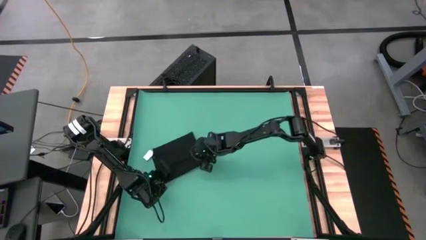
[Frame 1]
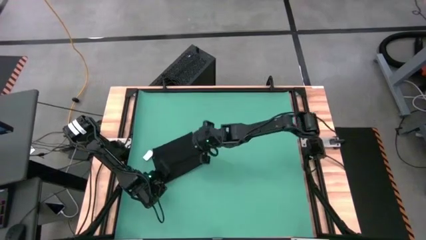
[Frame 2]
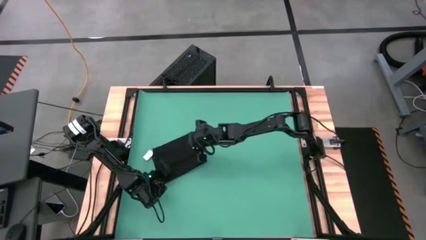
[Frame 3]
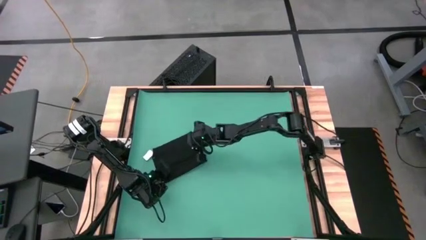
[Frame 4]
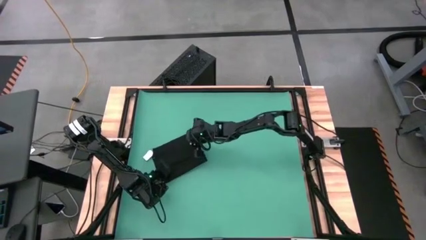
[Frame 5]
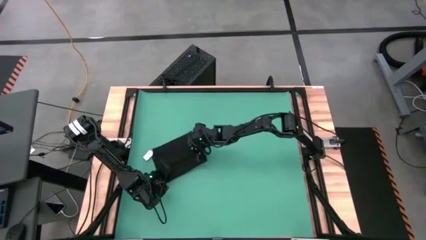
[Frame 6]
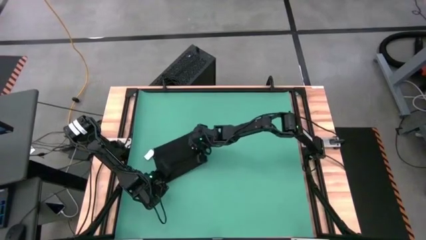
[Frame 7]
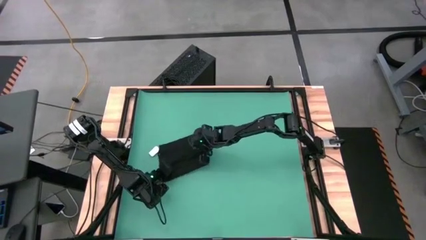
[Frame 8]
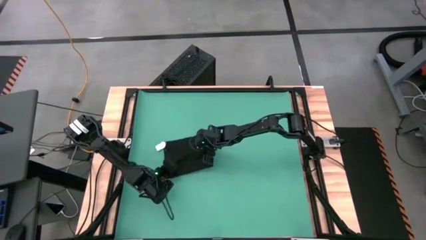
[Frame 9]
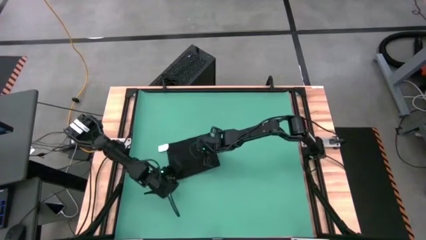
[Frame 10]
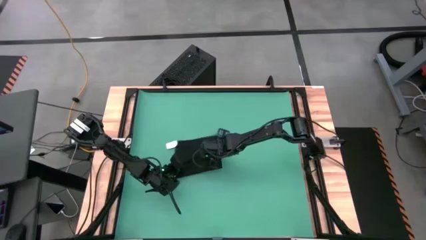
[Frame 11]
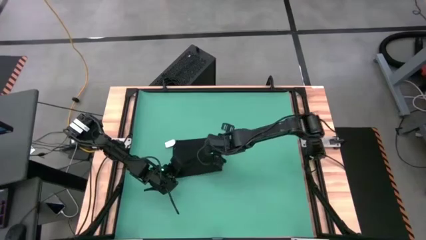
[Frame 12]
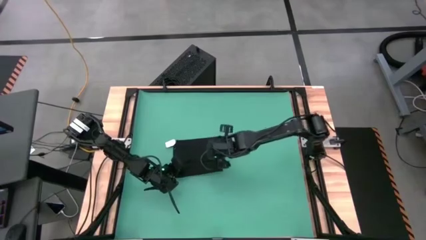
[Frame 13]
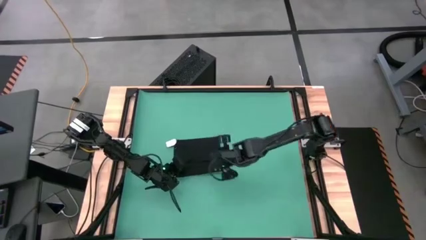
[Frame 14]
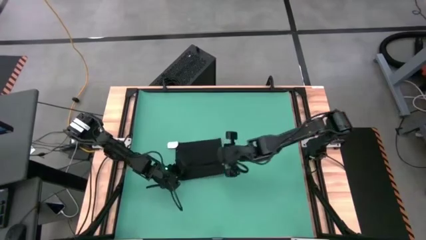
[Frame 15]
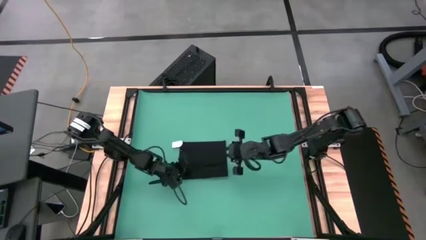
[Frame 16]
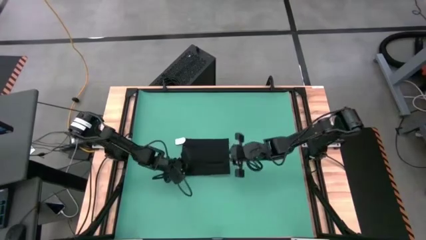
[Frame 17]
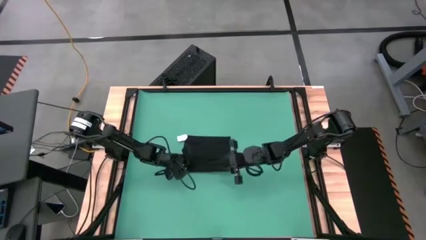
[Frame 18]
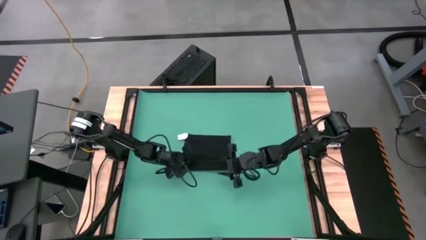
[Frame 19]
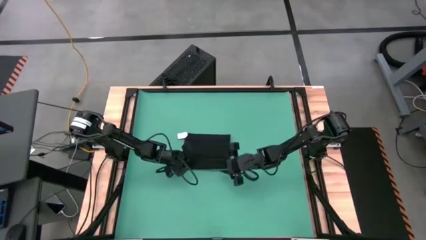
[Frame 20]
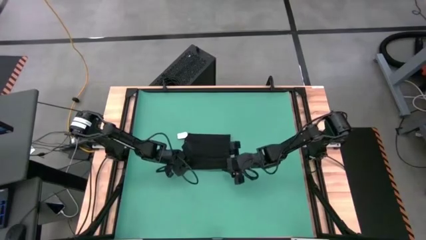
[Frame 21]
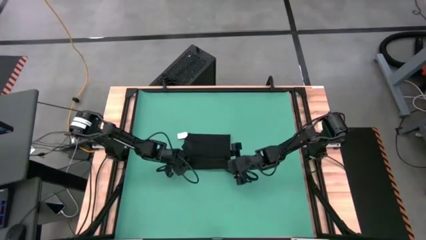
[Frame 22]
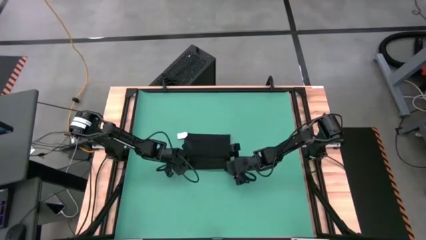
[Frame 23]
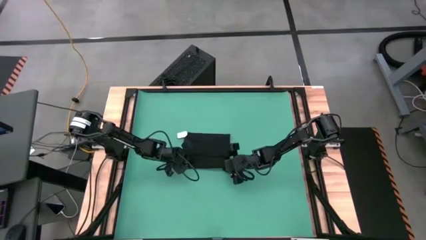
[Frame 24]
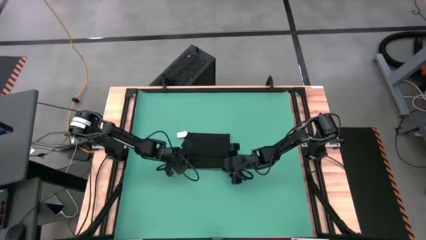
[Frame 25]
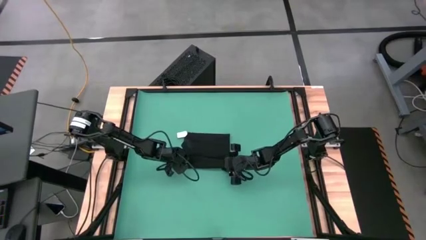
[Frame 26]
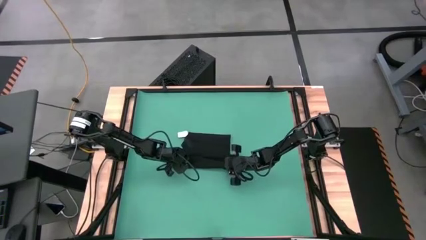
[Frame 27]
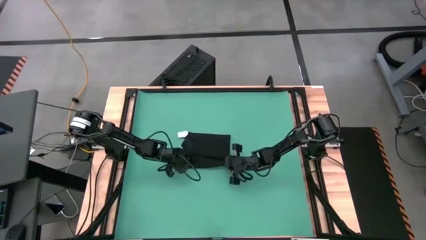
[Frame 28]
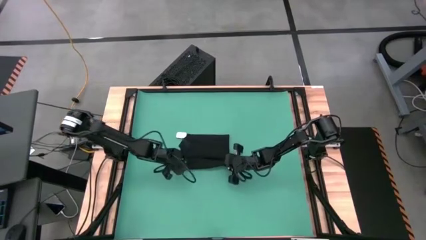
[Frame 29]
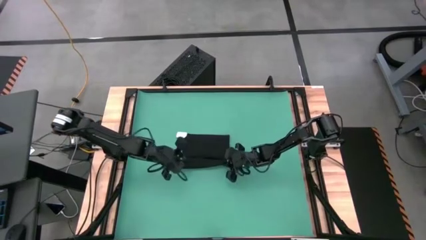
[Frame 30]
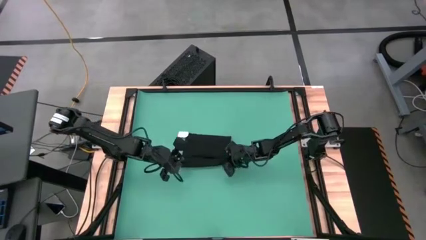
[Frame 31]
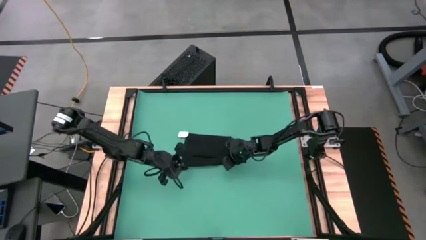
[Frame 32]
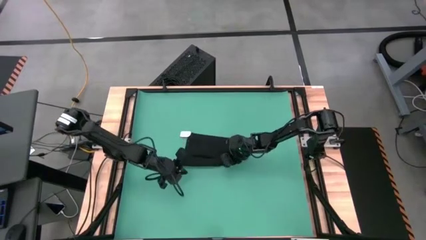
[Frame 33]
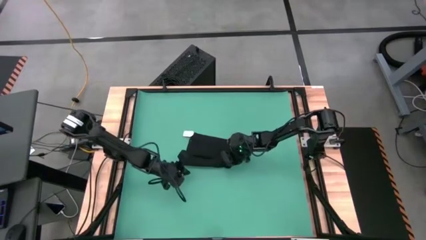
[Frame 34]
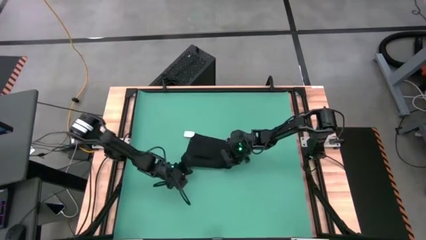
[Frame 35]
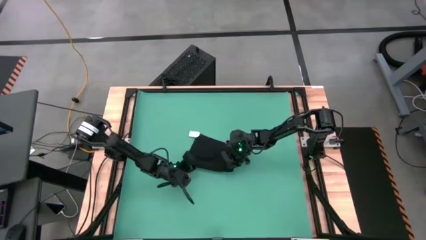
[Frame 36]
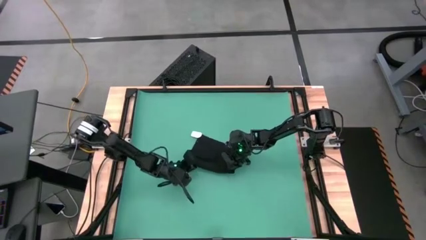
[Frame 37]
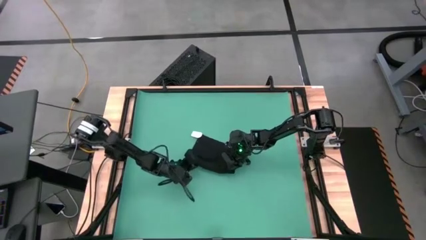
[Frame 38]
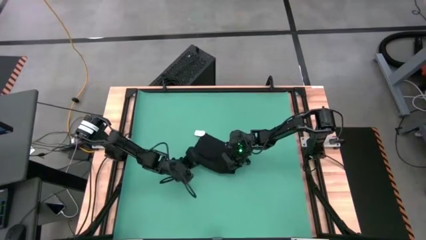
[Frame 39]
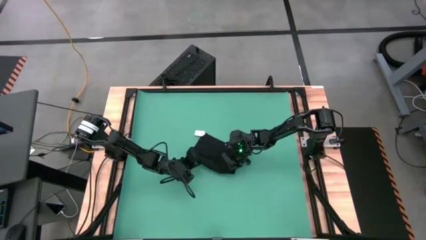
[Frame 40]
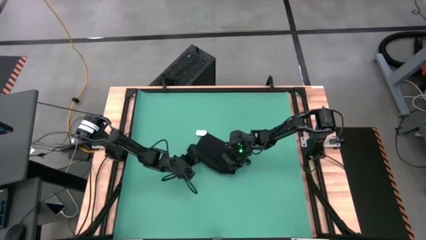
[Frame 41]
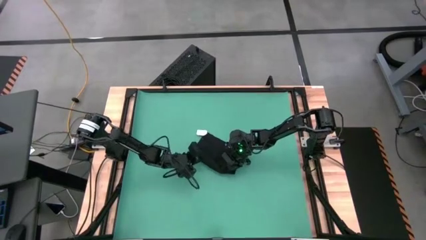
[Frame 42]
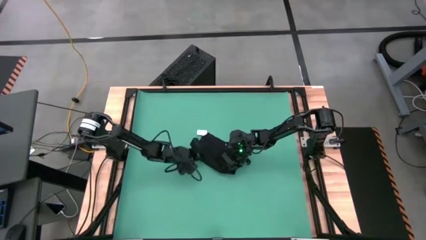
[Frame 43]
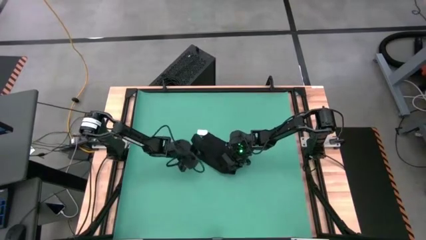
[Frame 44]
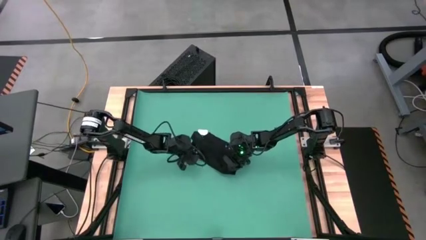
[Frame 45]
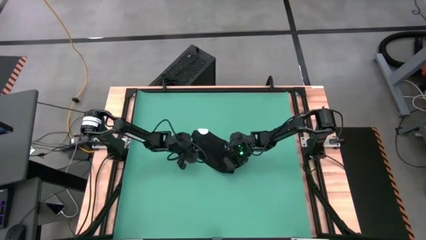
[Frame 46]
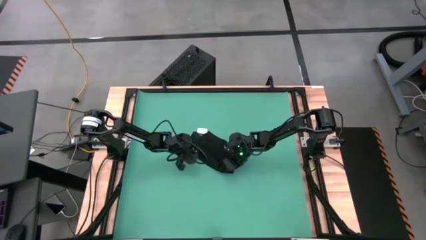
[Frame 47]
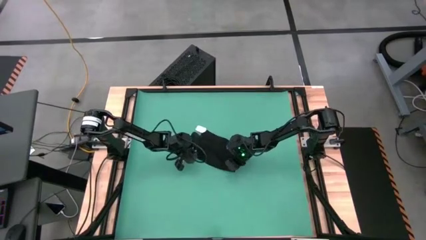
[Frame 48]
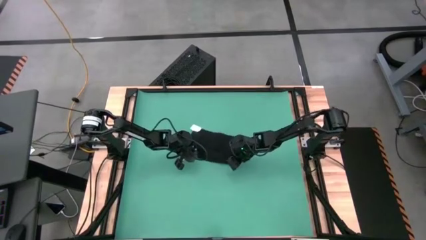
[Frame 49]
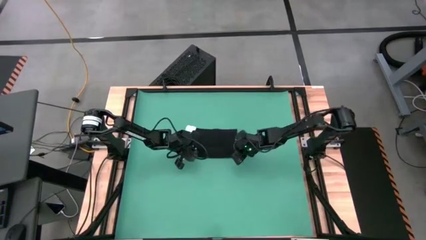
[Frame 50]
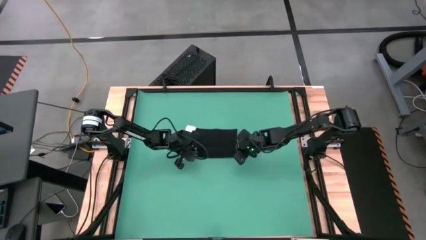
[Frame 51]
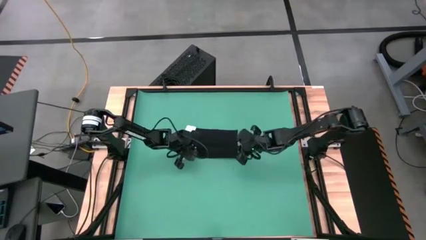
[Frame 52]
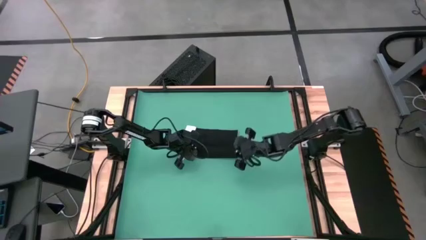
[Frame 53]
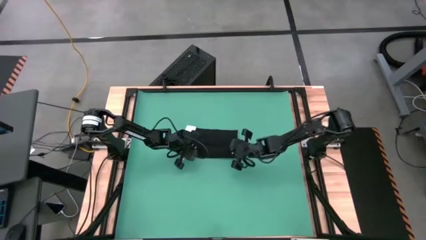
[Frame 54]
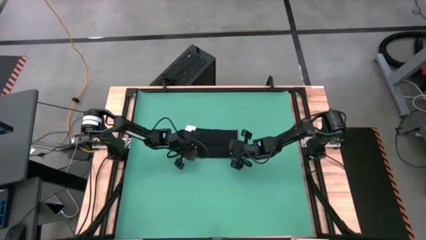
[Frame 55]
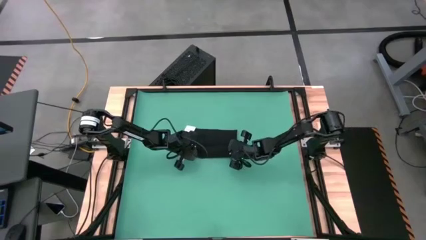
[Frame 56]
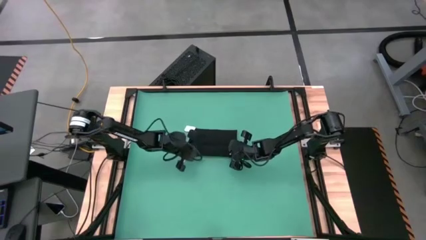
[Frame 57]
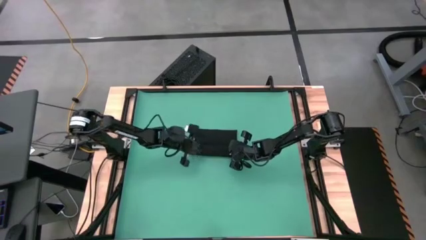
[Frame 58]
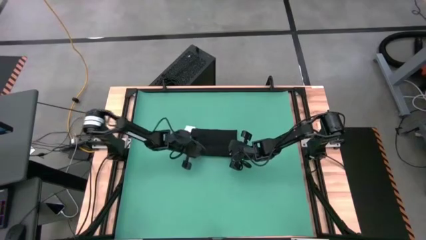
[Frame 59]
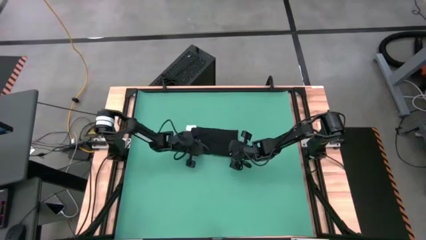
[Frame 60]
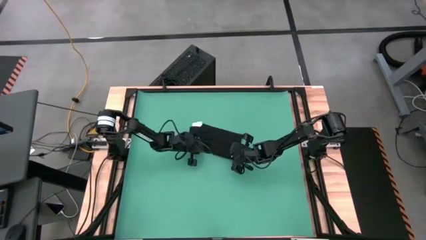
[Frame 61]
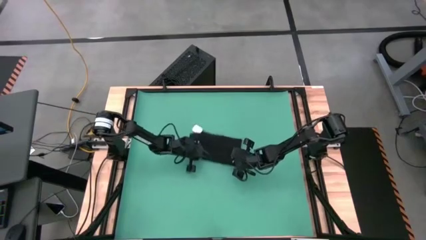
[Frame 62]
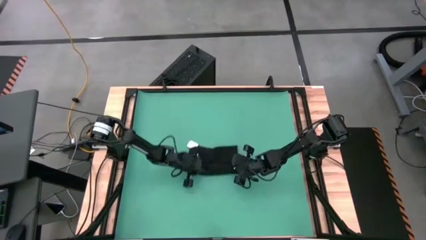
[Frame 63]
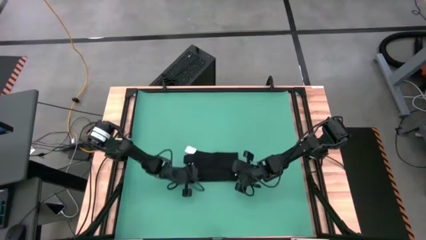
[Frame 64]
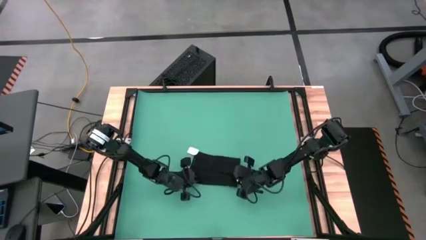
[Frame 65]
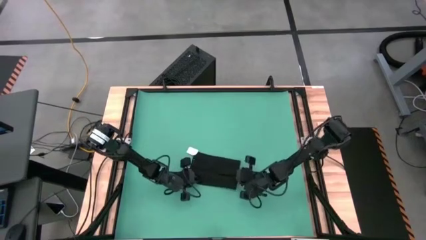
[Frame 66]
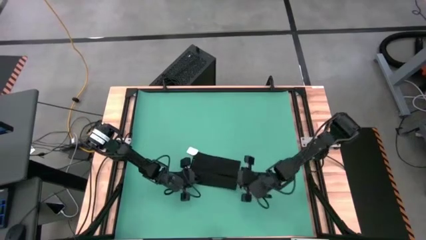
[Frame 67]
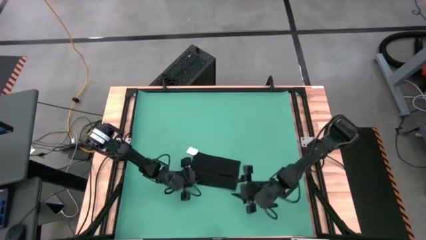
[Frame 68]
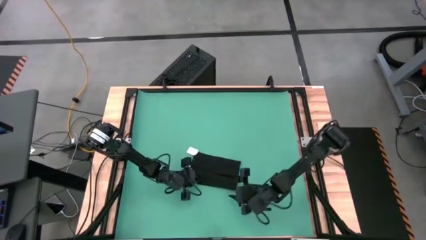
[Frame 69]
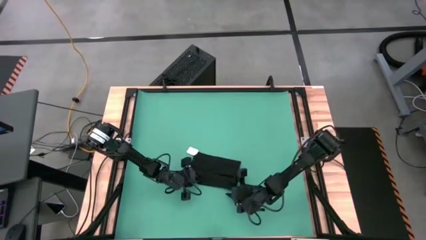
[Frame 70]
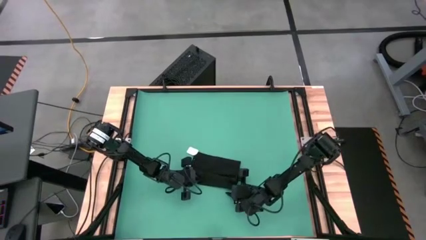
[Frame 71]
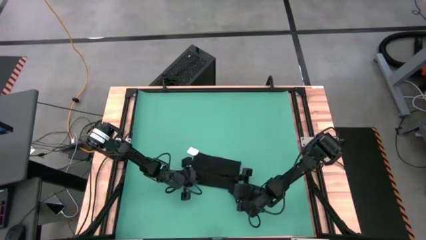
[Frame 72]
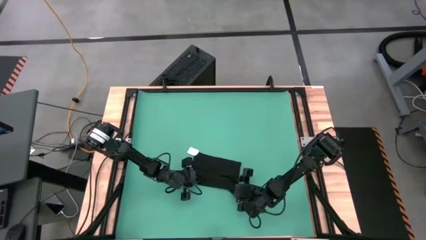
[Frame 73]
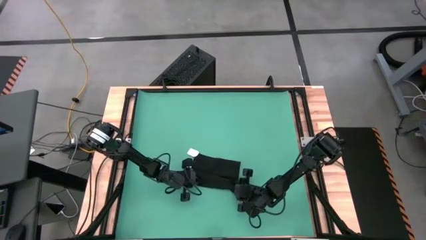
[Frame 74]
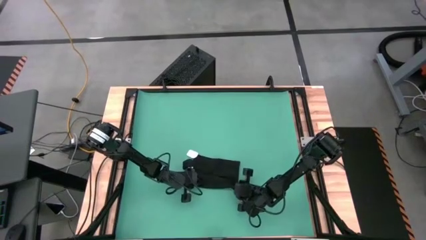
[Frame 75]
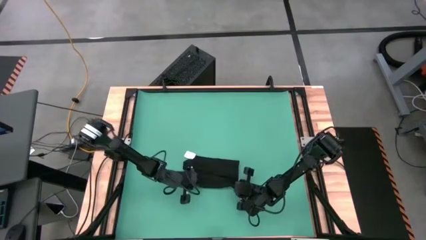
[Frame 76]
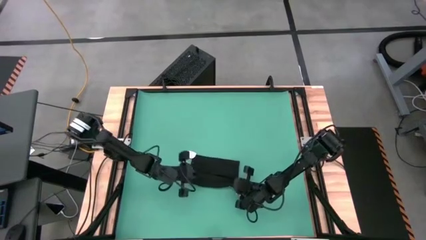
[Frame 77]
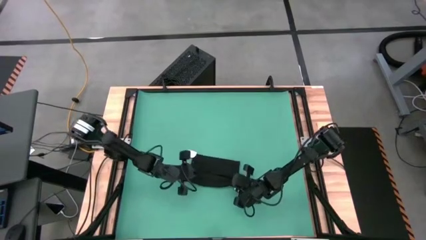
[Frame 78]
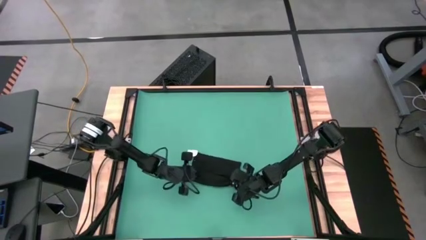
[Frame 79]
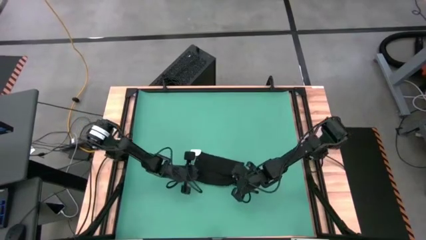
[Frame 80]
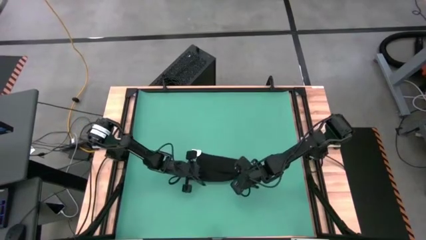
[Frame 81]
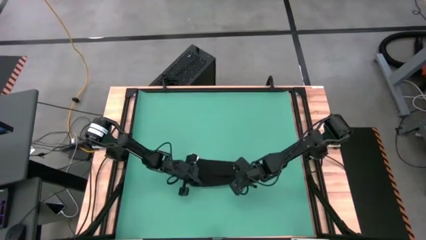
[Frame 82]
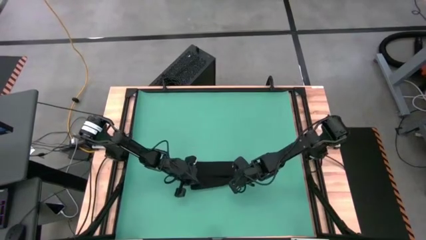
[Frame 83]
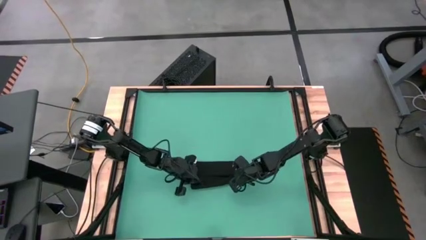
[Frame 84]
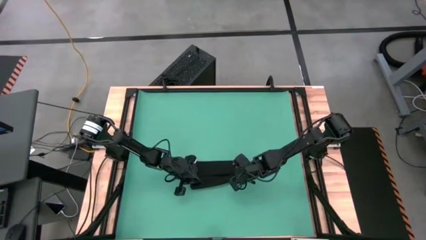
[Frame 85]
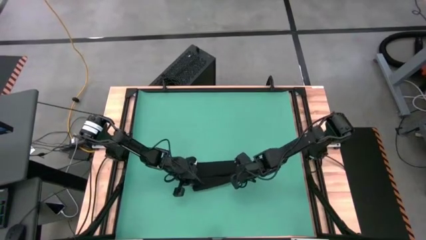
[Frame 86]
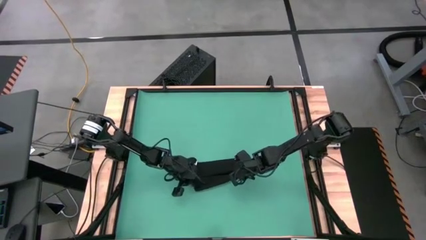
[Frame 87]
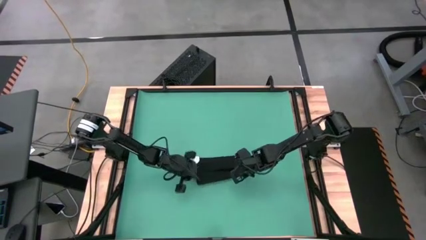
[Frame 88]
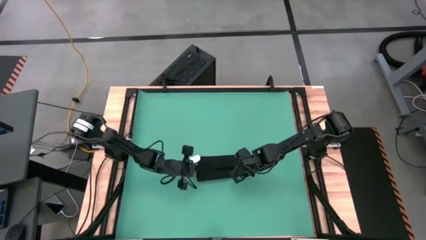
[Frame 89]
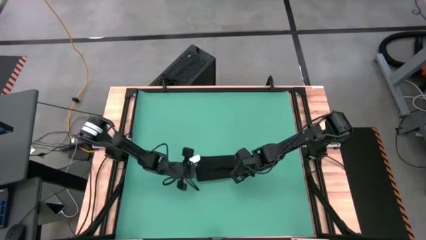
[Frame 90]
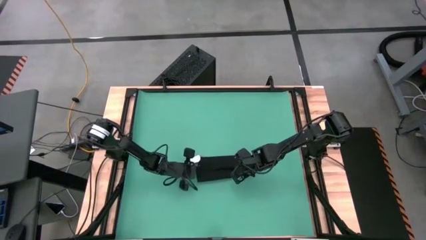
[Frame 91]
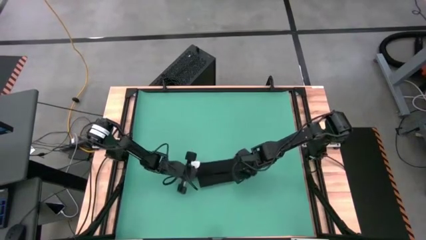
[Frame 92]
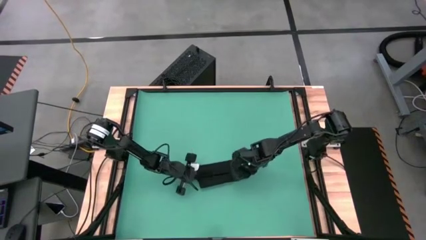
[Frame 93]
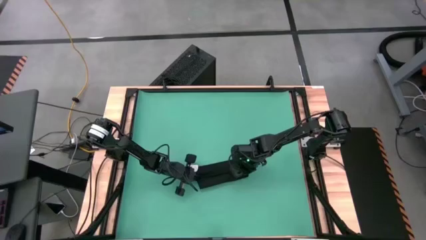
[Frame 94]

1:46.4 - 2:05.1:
Task: Roll towel into tight, uniform cylinder
Roll the towel
